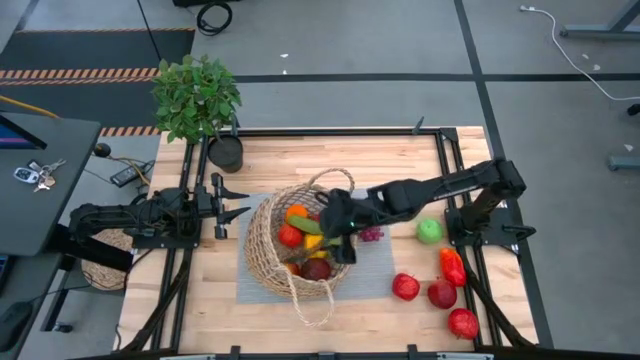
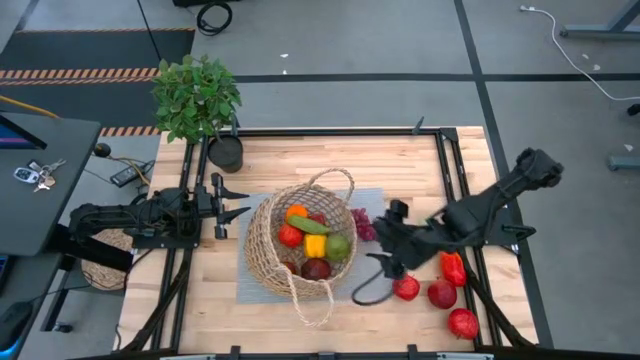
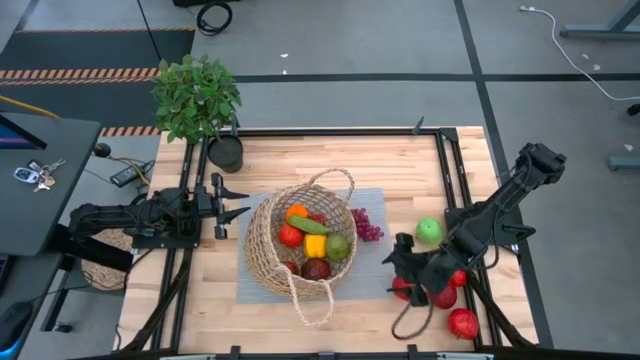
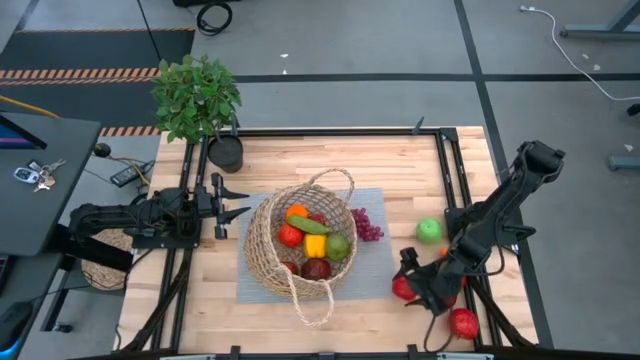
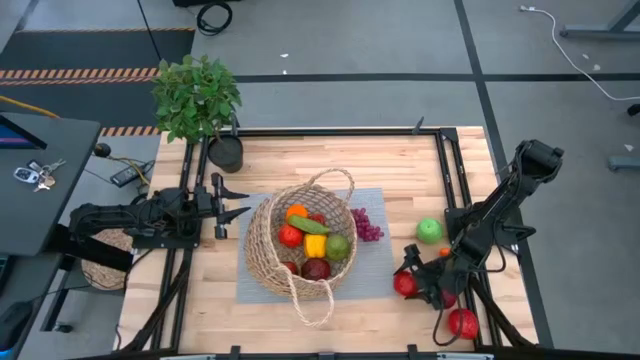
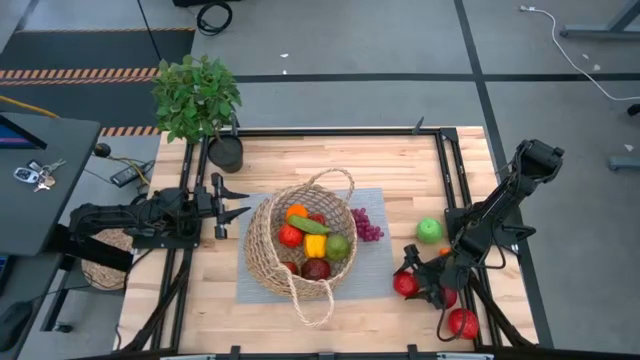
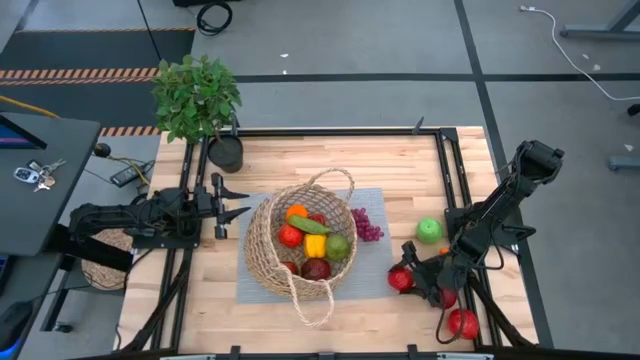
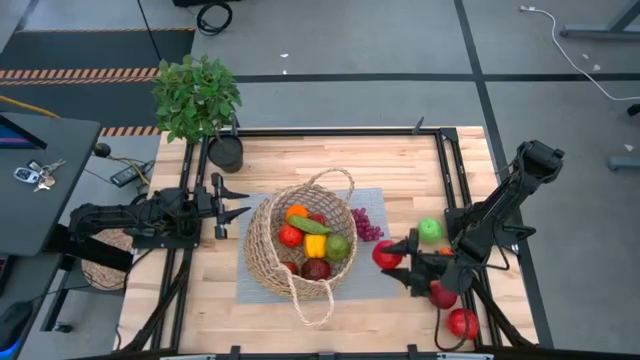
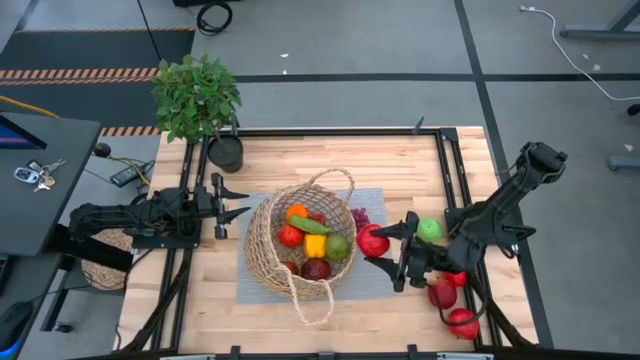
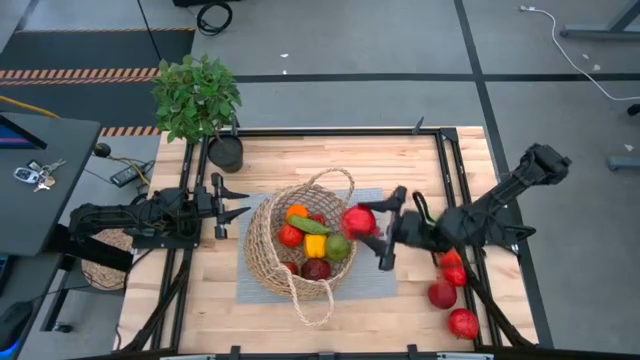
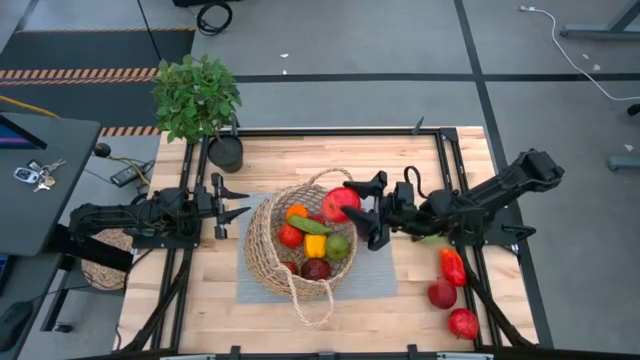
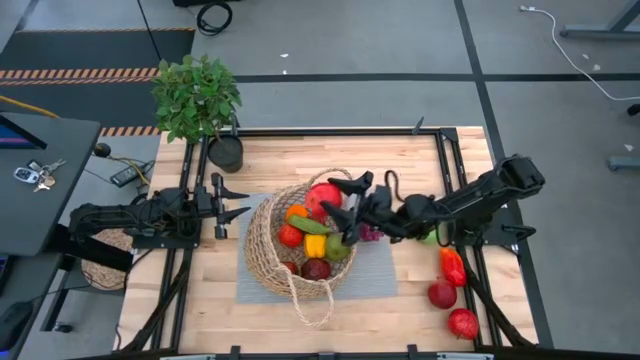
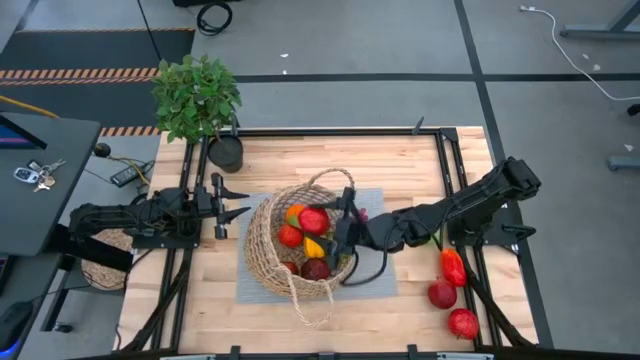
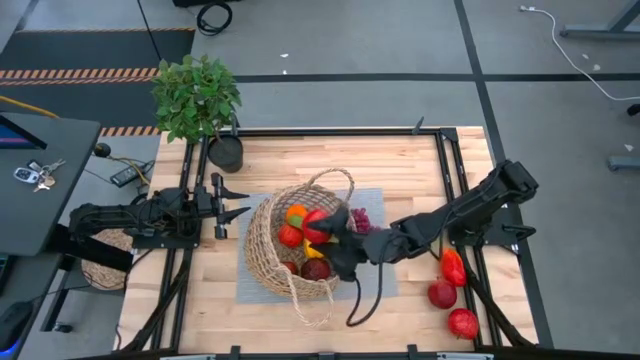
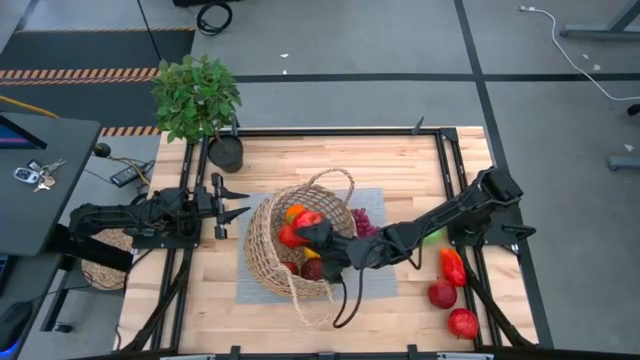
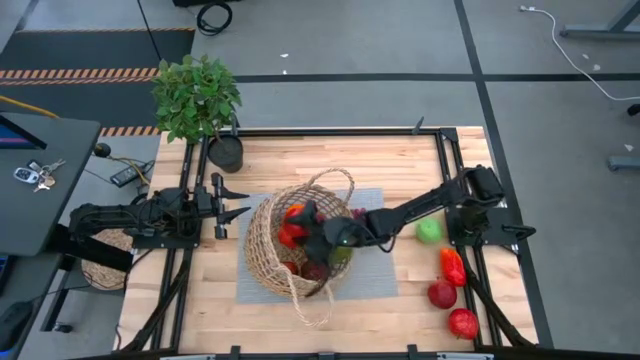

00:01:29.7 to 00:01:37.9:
Task: Build produce basket
Put the top red apple in the basket

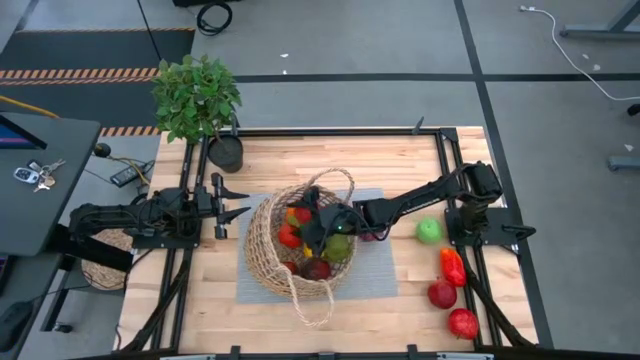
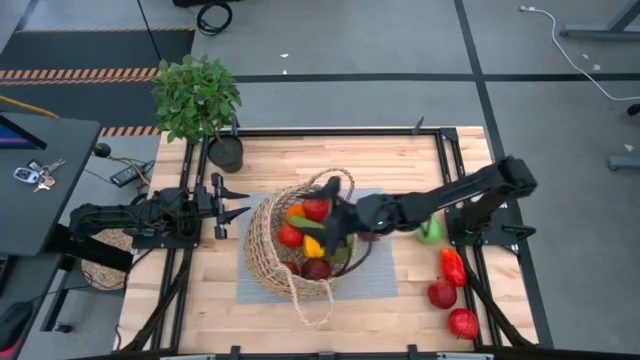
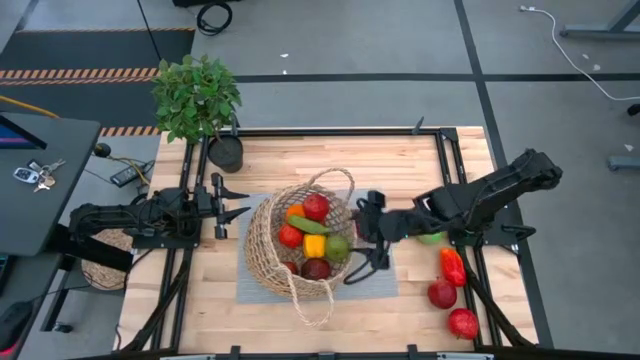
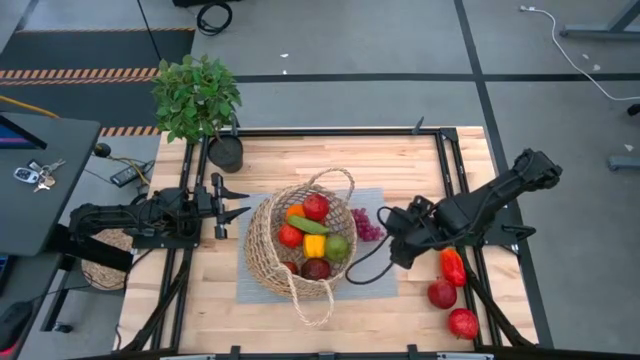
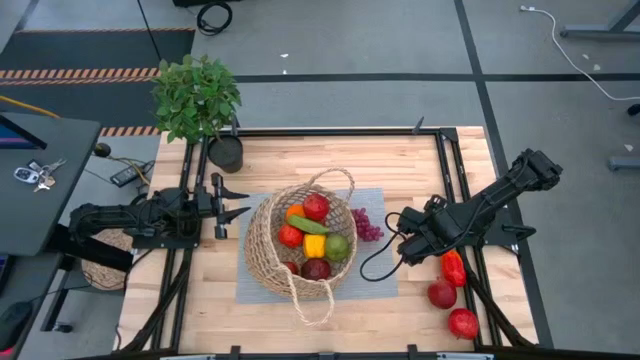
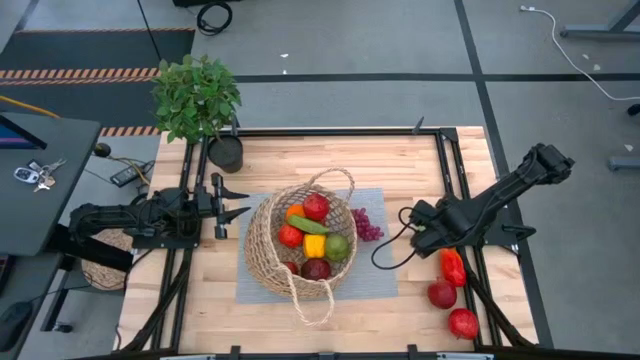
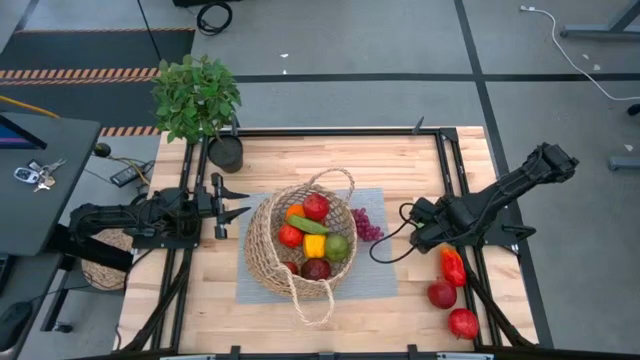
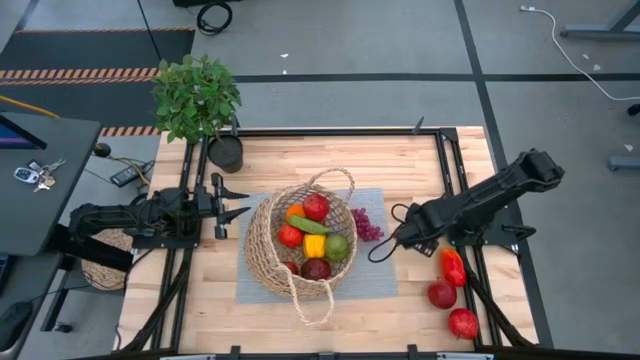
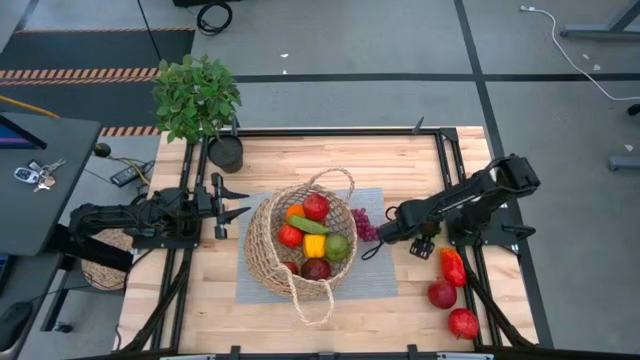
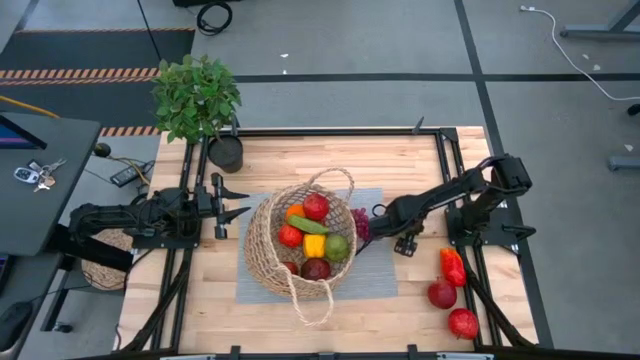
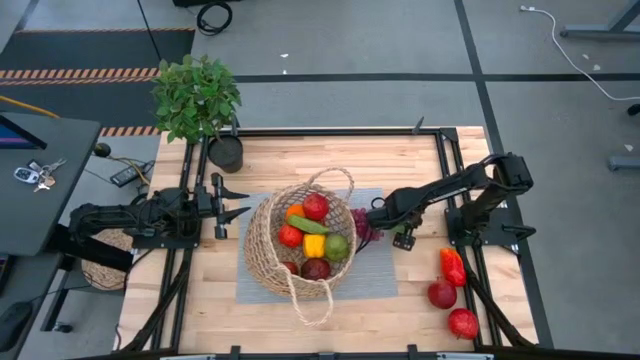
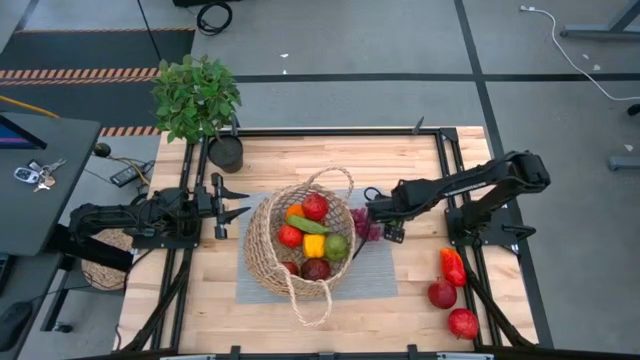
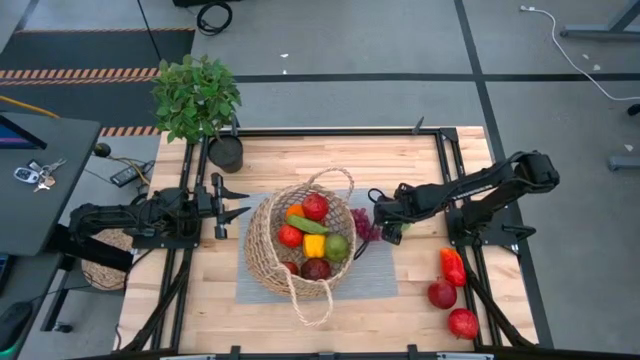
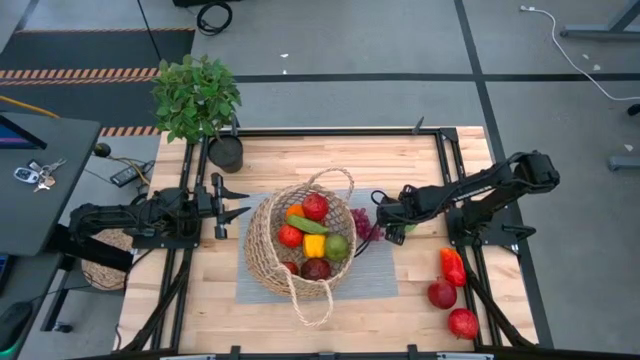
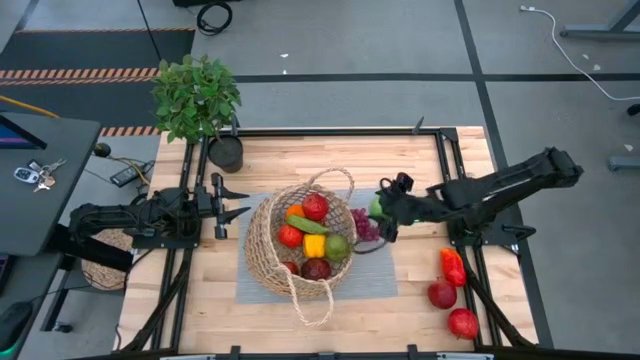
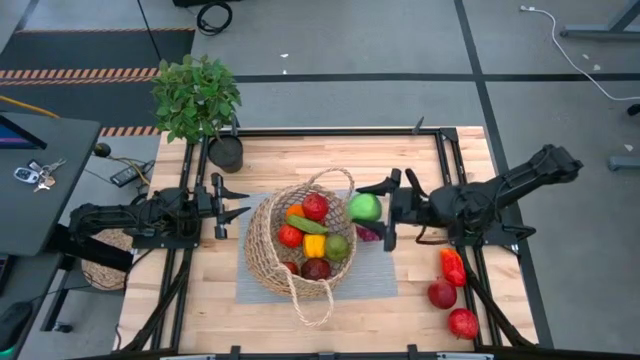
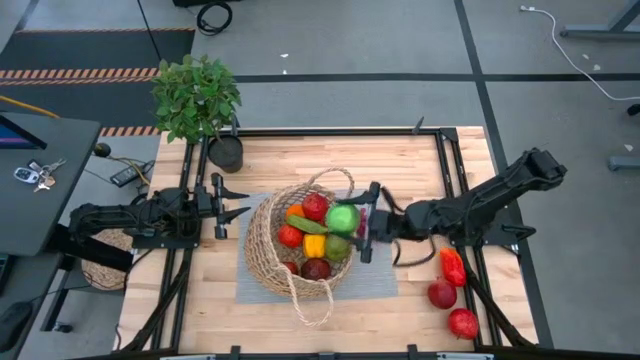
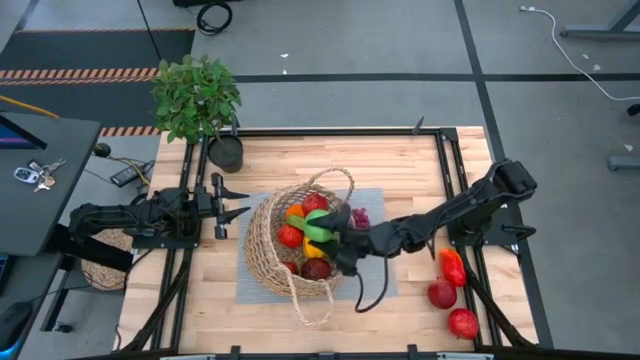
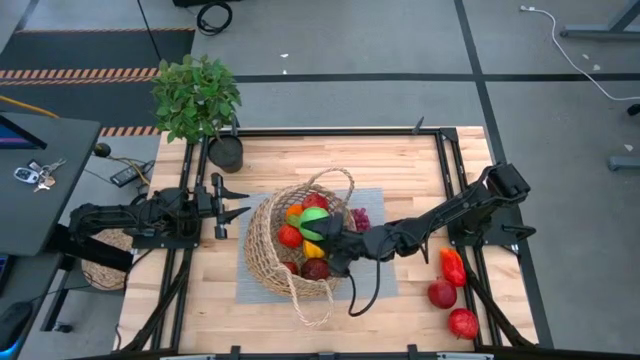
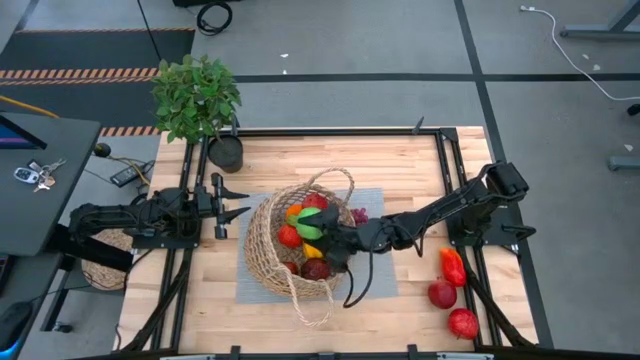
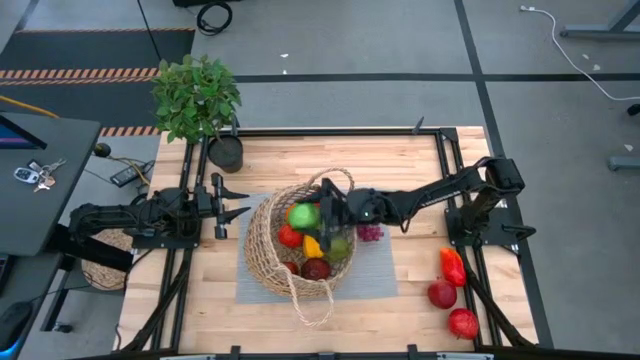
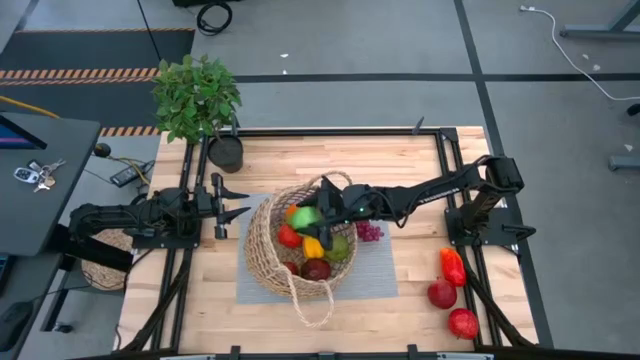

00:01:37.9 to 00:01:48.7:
Put the green apple in the basket

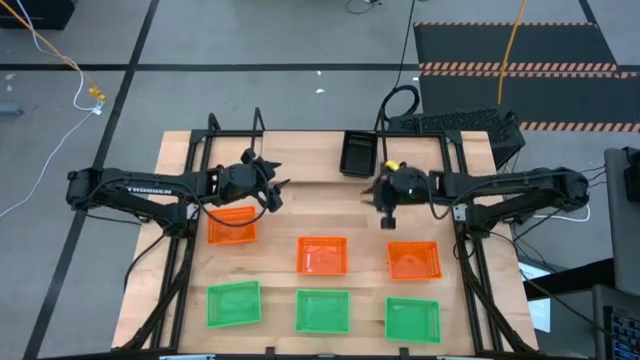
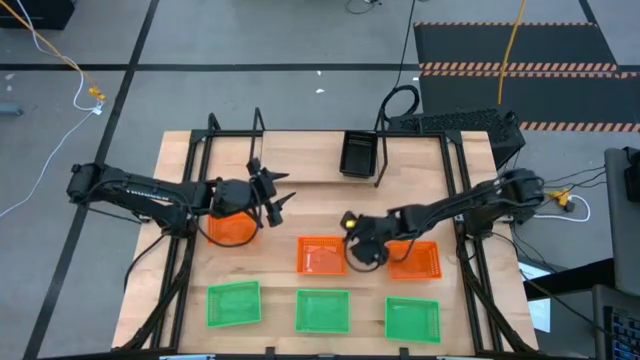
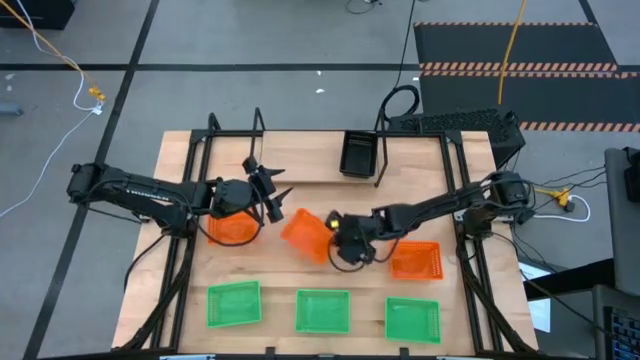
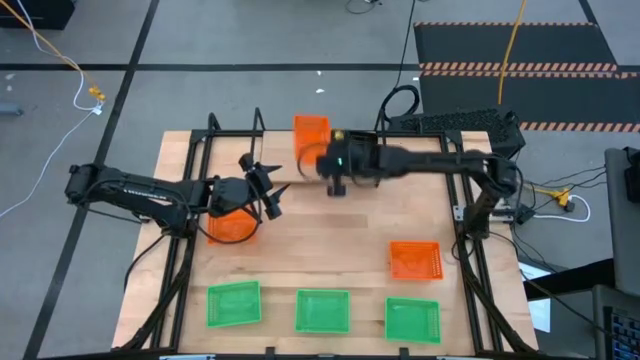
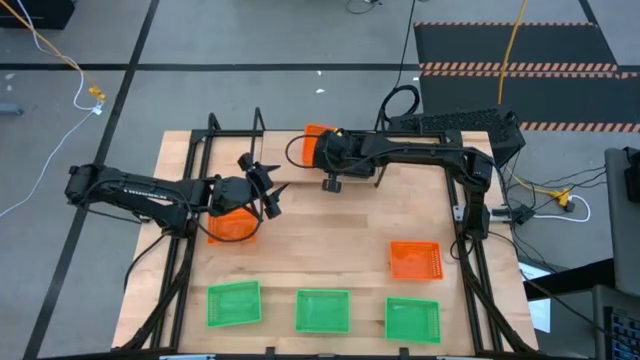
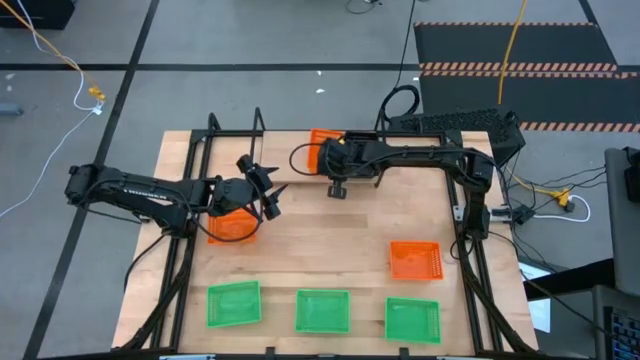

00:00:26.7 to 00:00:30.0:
Task: Stack baskets on shelf by color
Put the bottom left orange bin on the shelf
